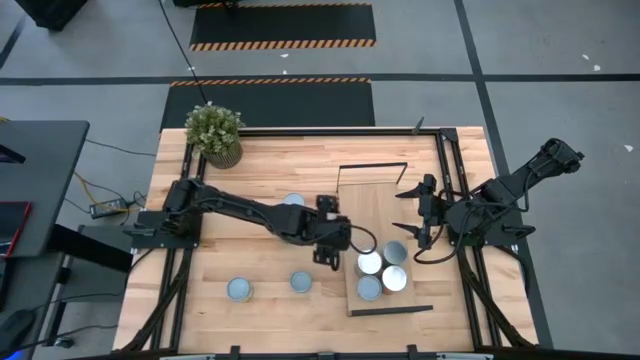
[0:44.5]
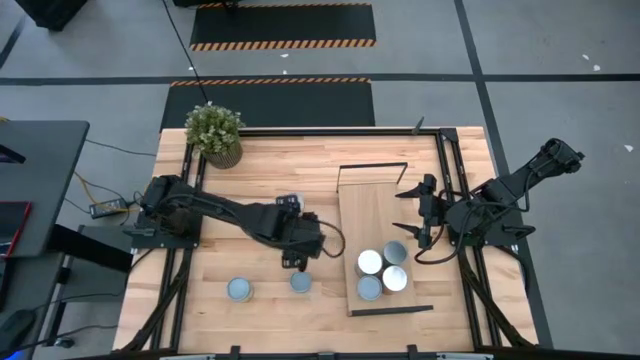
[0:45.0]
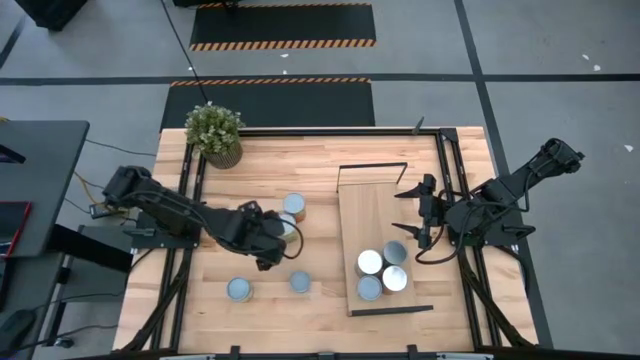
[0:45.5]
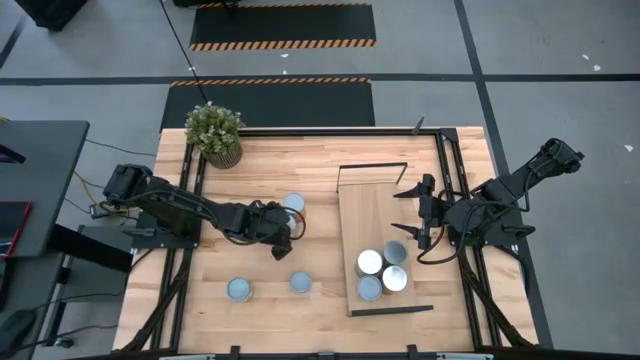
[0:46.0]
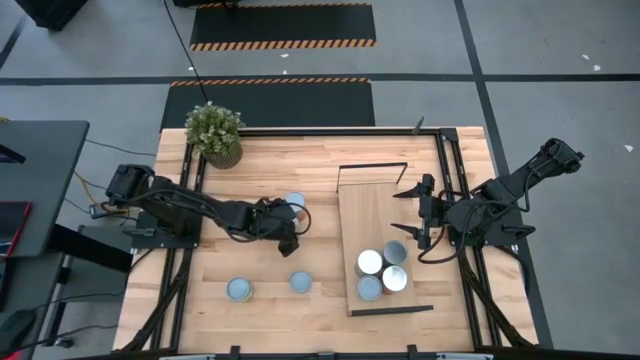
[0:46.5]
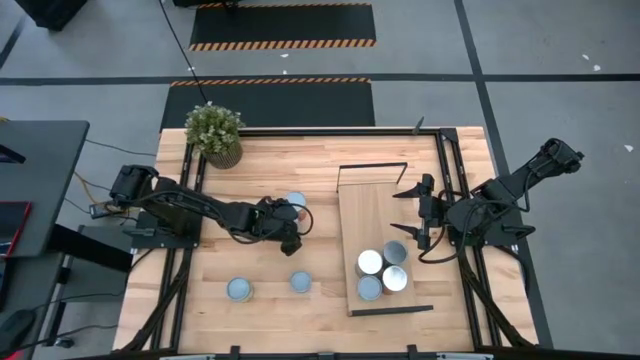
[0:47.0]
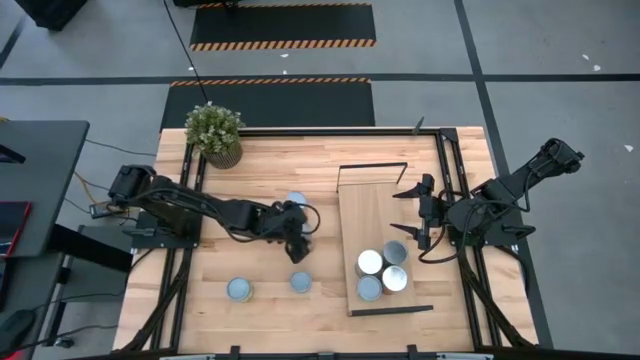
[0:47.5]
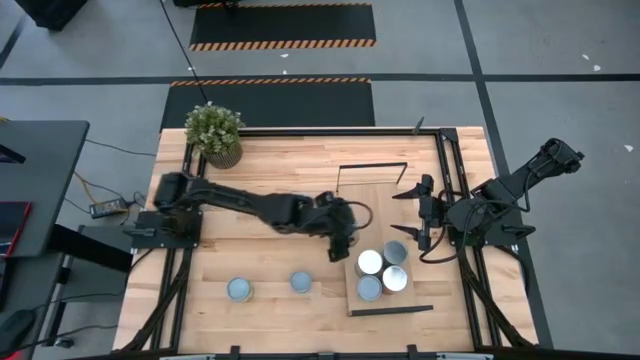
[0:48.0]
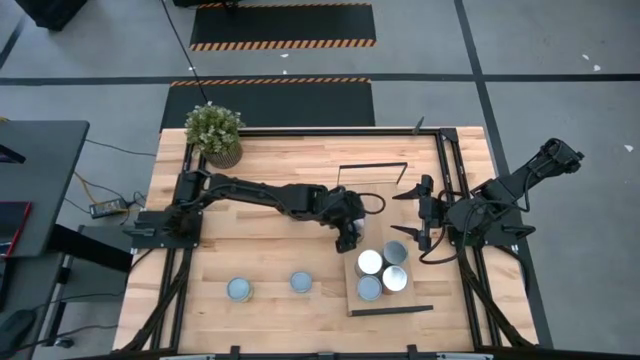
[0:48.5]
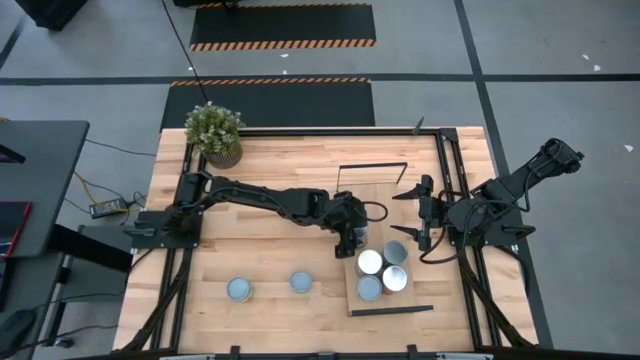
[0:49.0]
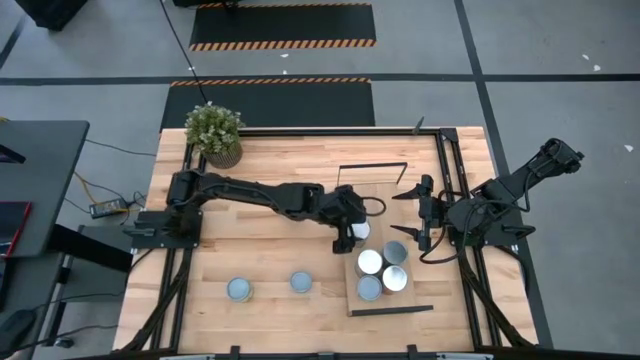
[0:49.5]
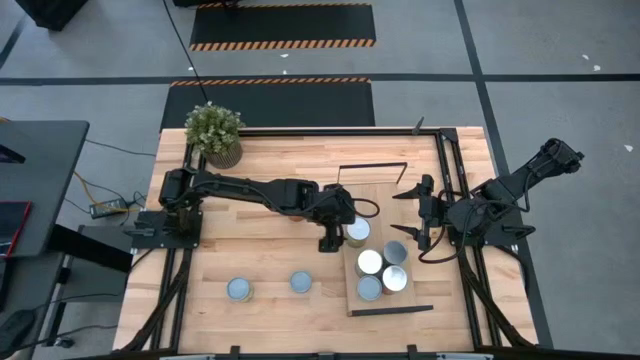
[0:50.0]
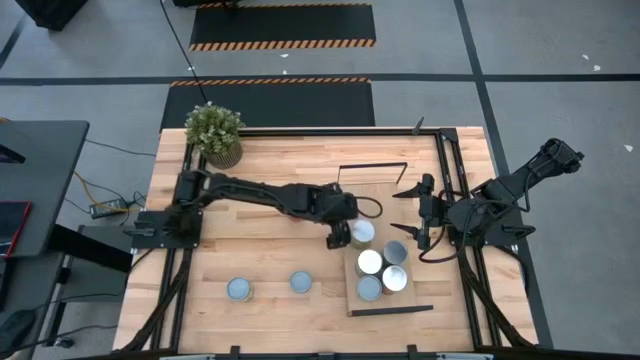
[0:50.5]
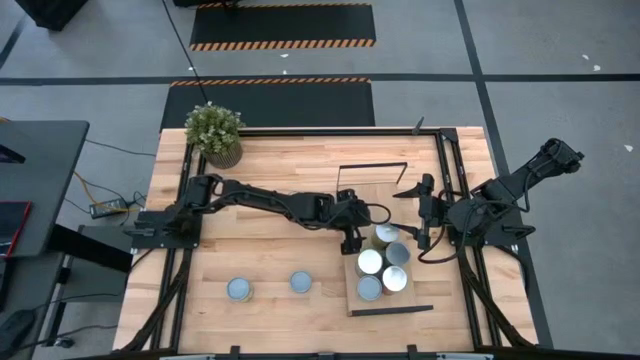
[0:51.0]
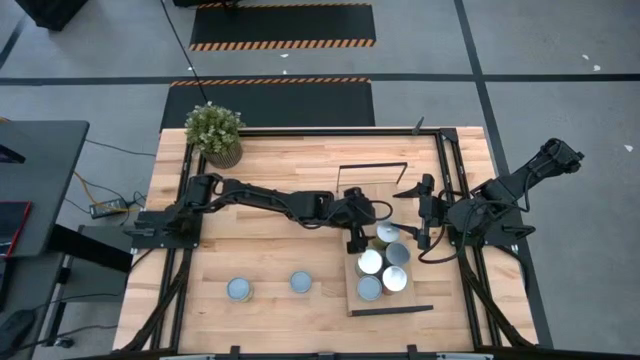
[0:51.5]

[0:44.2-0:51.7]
Task: Pick and place cans onto a shelf
Put the canned oranges on the shelf

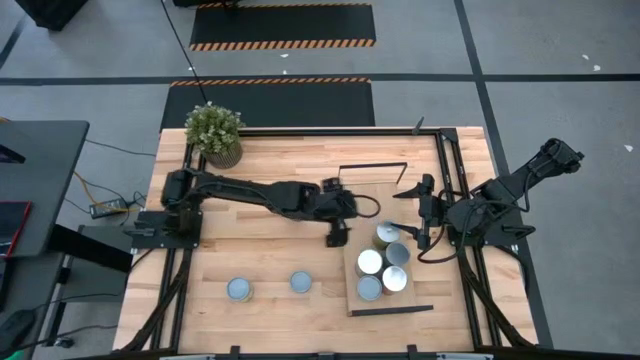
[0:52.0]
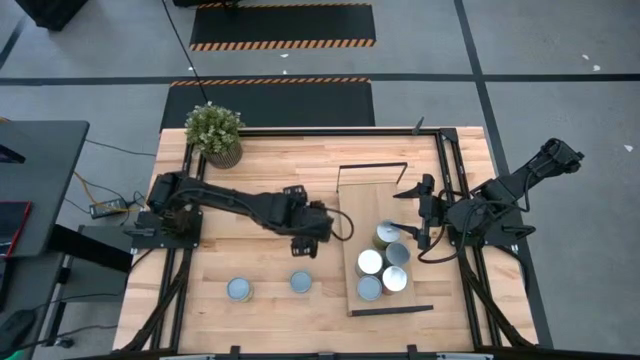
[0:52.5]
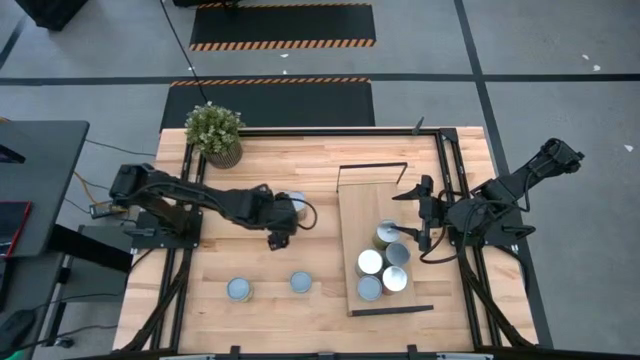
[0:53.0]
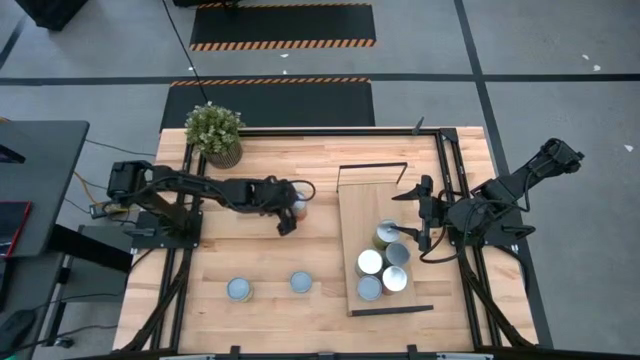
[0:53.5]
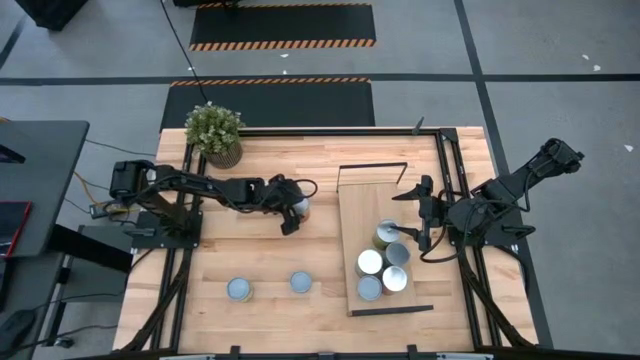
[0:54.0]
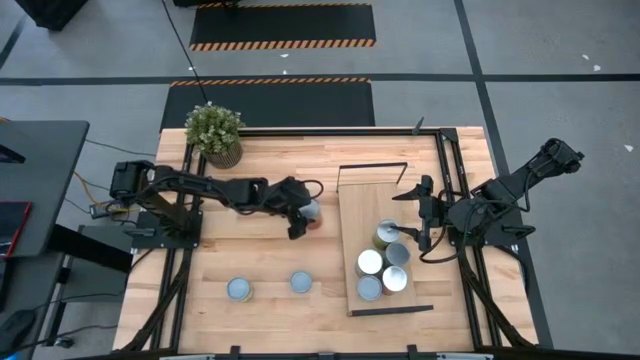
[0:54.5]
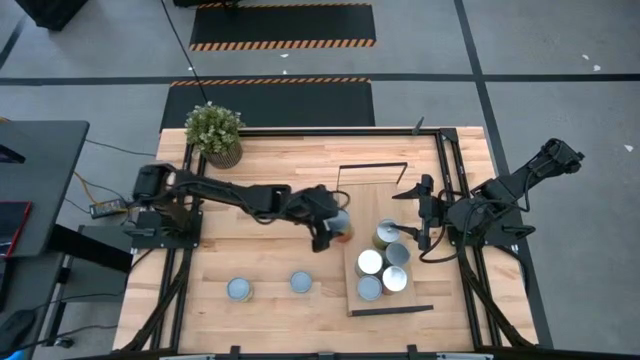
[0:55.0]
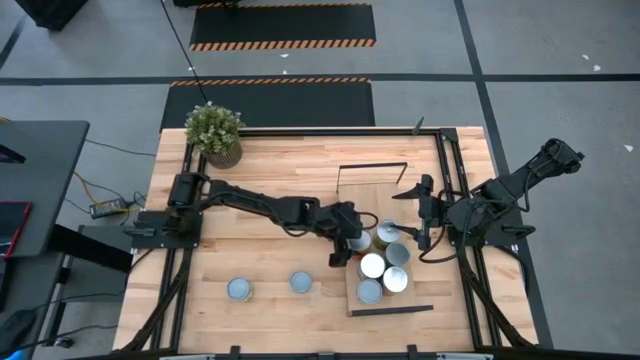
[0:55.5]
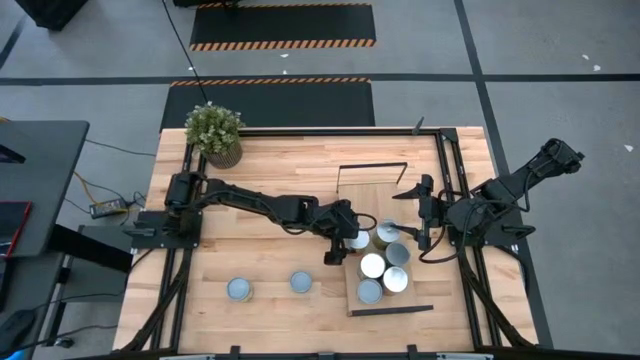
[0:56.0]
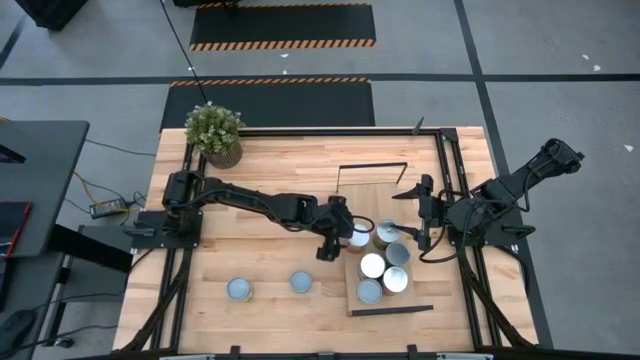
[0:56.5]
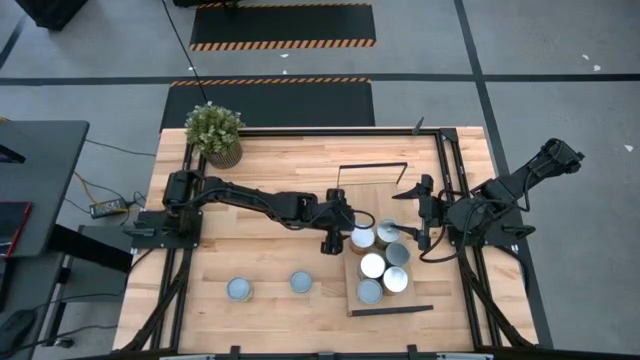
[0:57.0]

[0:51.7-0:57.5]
Put the canned pineapple on the shelf

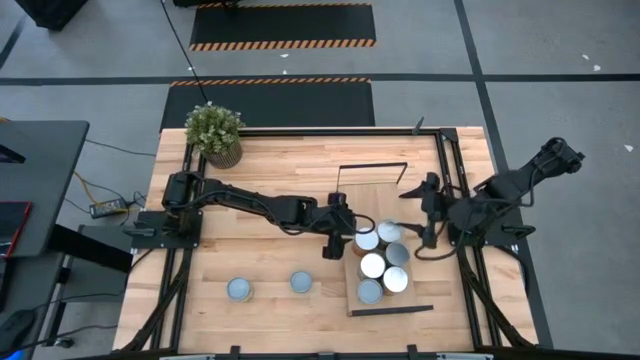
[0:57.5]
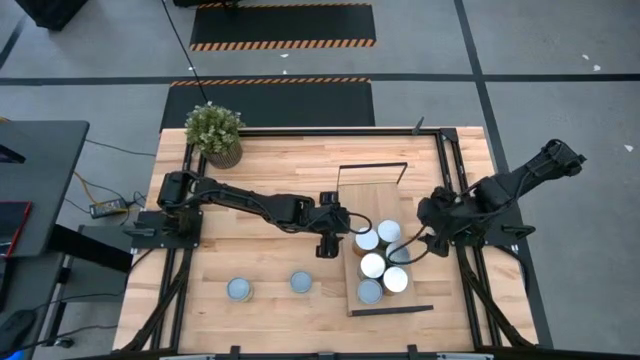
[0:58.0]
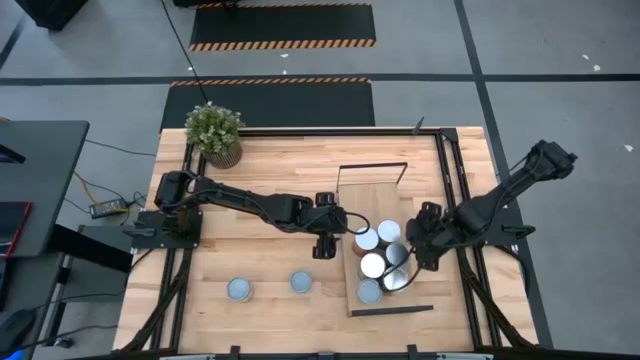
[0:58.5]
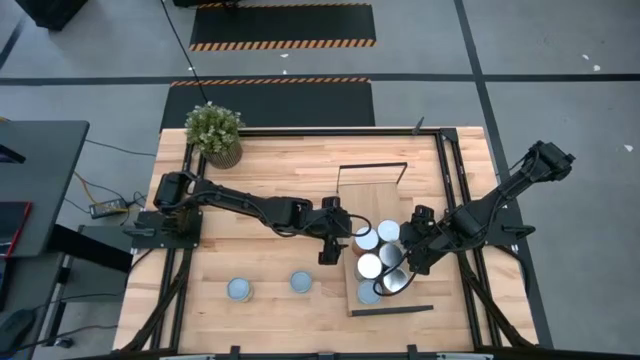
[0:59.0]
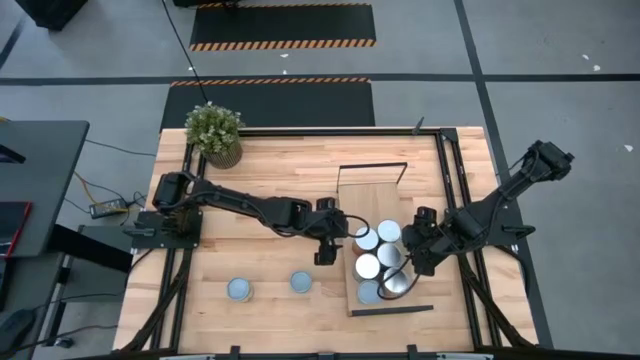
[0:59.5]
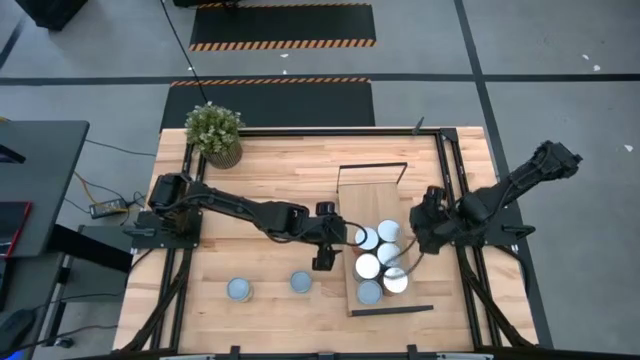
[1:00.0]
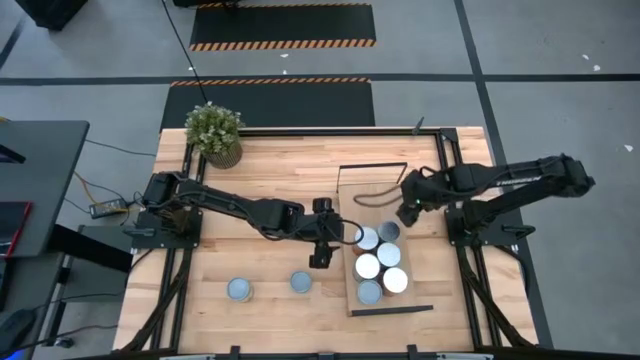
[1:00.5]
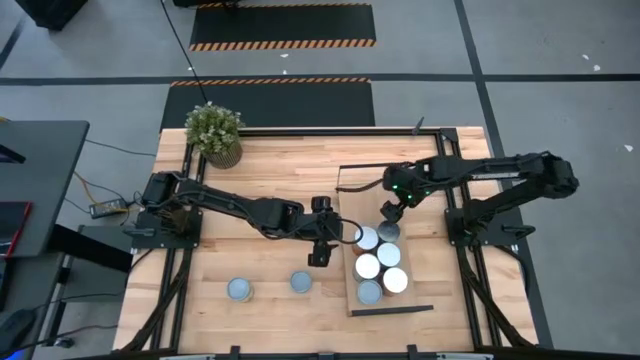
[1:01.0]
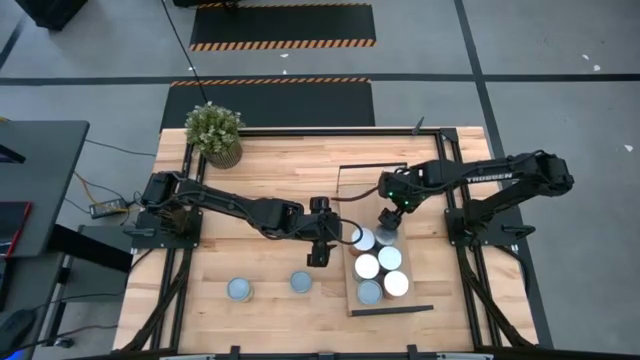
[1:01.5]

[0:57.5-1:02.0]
Adjust the cans on the shelf

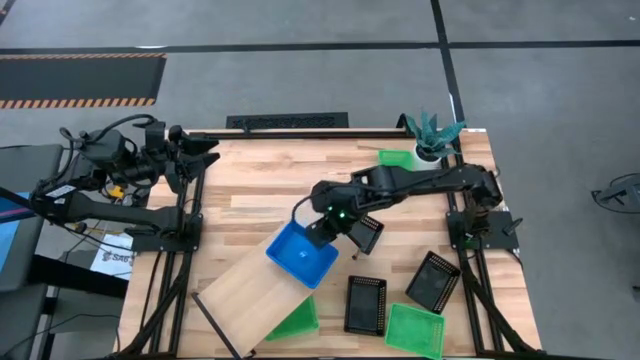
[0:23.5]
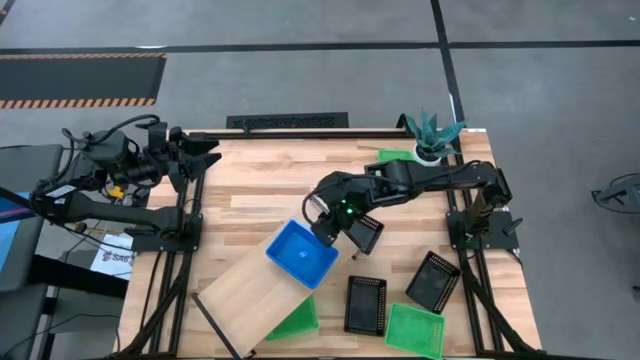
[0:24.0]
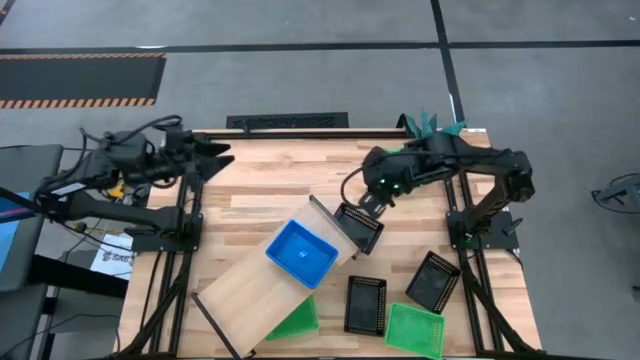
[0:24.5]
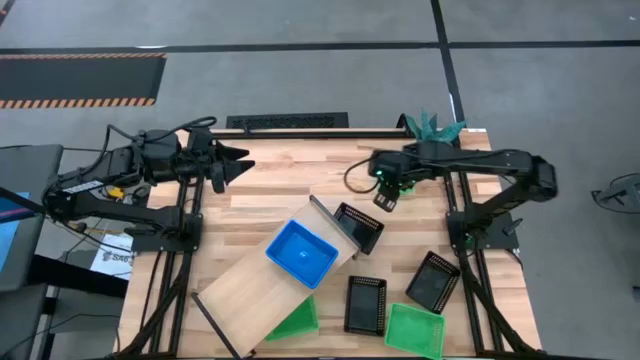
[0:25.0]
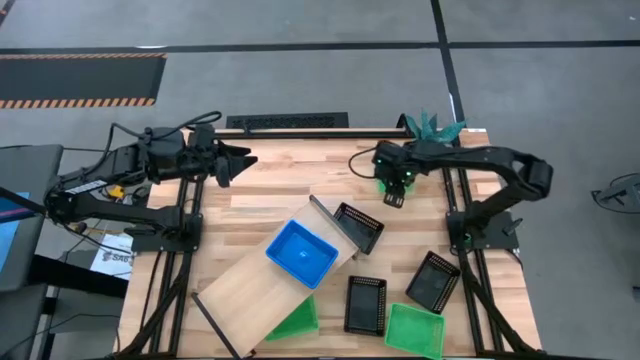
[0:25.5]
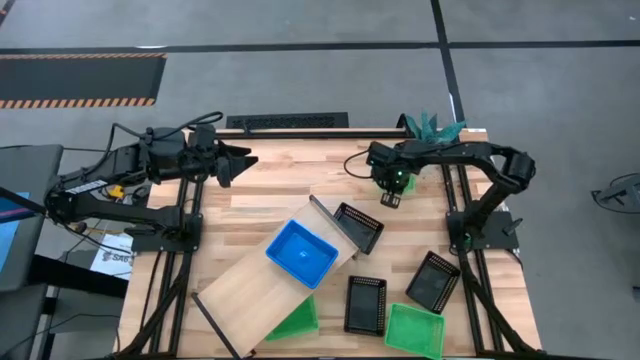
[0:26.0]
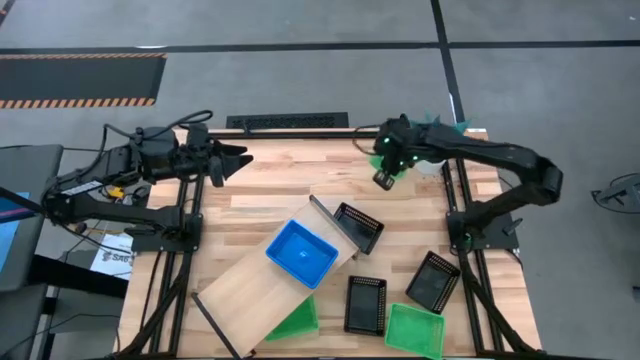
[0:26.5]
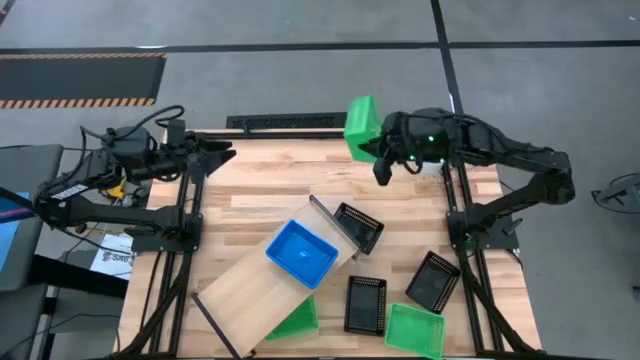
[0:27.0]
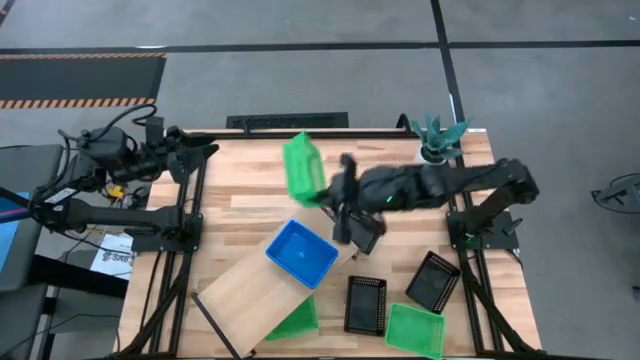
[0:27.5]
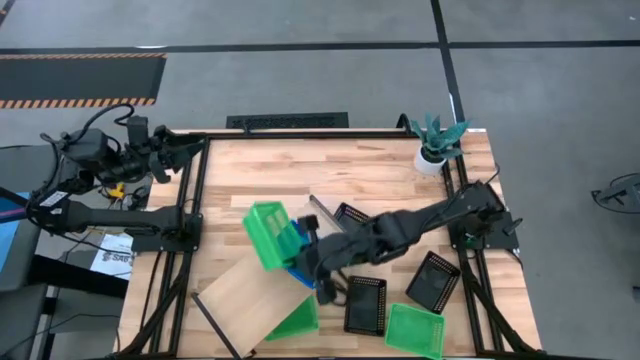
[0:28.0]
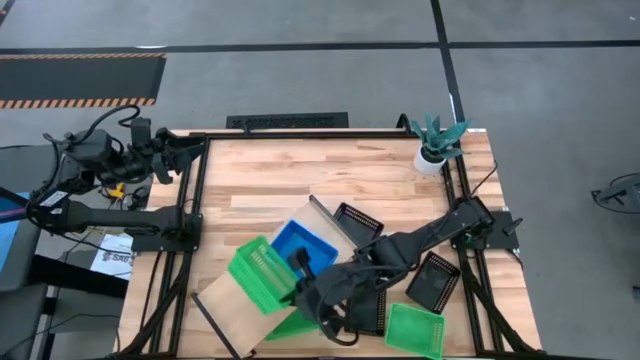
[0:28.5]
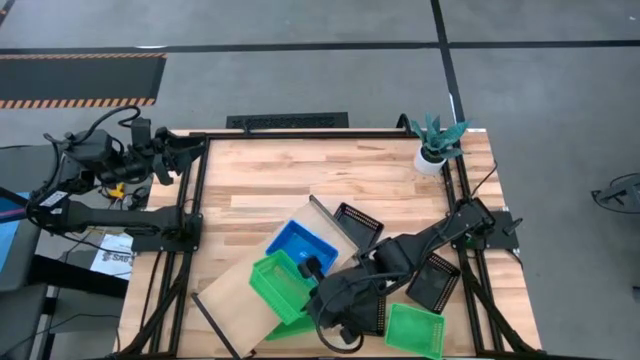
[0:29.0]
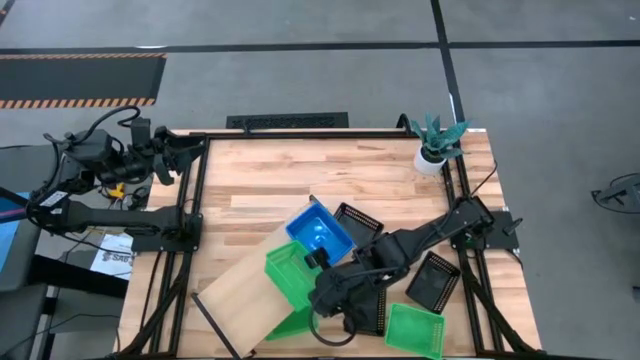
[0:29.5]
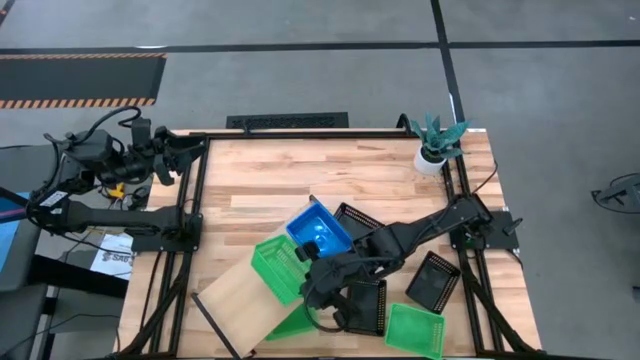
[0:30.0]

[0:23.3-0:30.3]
Task: Stack baskets on shelf by color
Put the top green bin on the shelf
